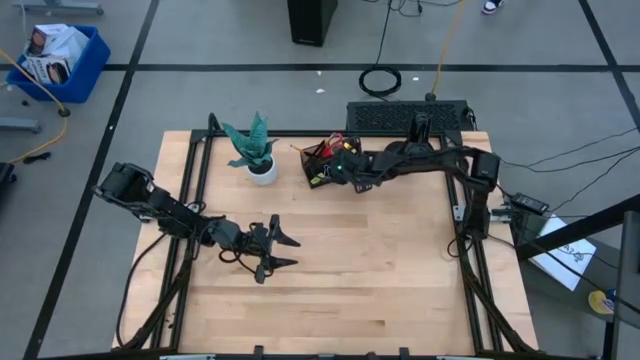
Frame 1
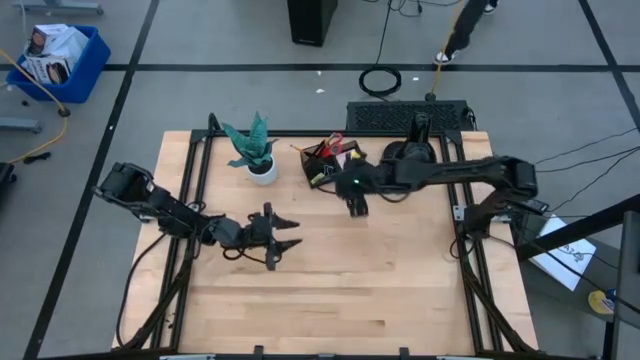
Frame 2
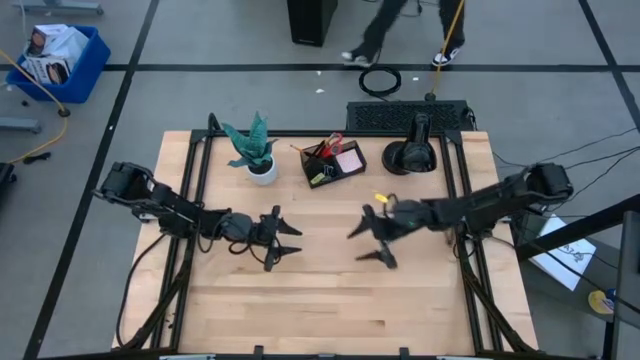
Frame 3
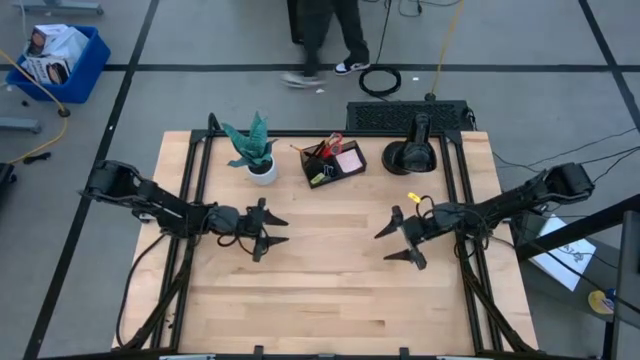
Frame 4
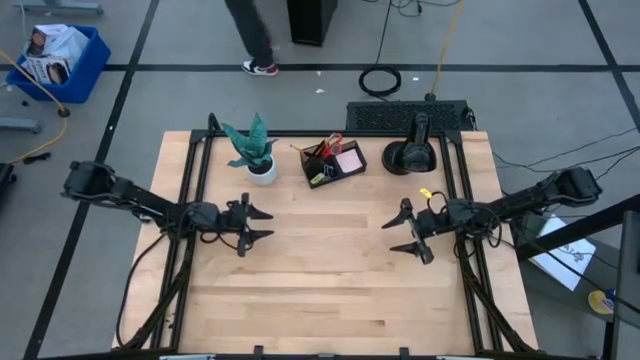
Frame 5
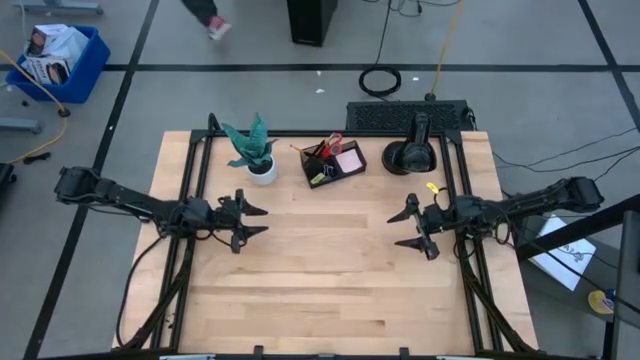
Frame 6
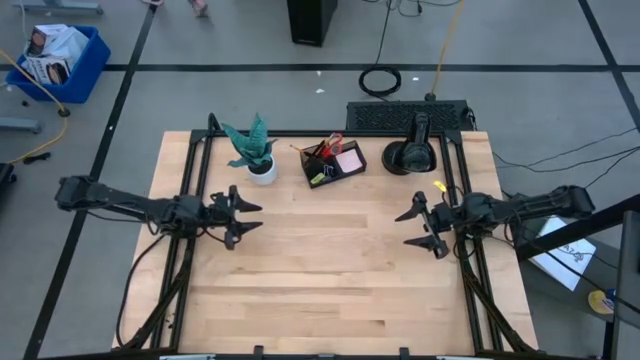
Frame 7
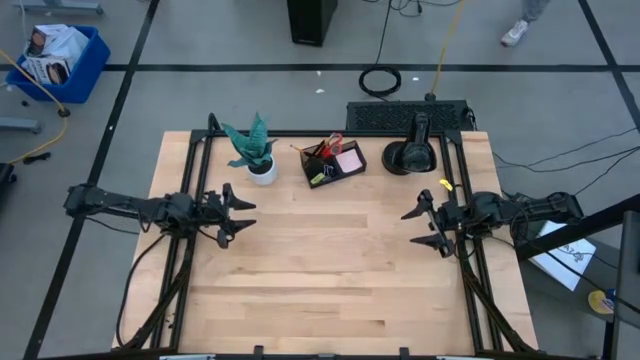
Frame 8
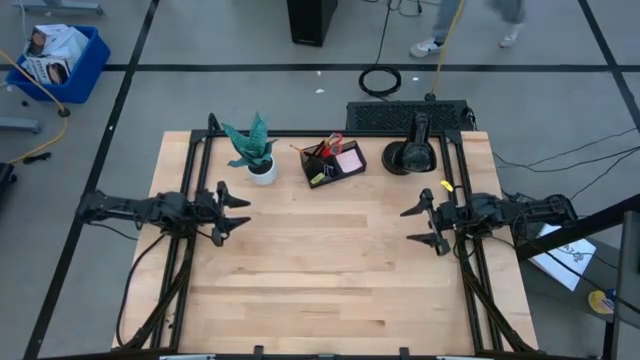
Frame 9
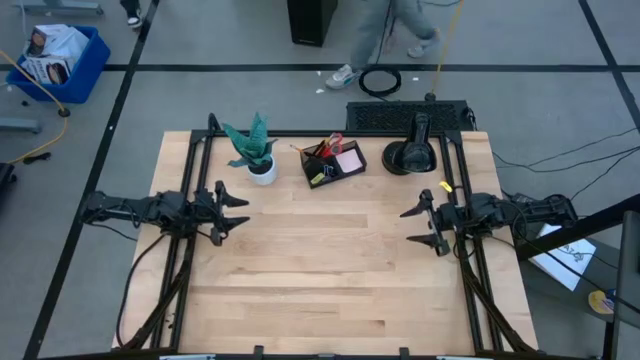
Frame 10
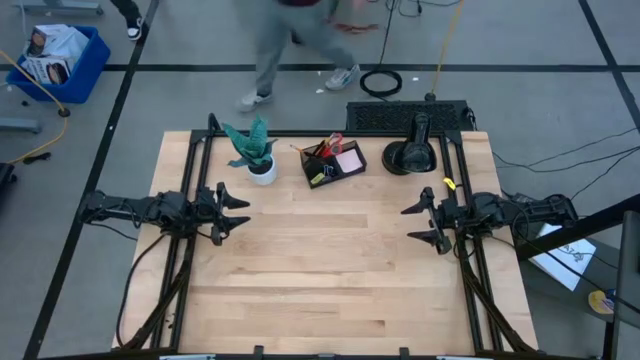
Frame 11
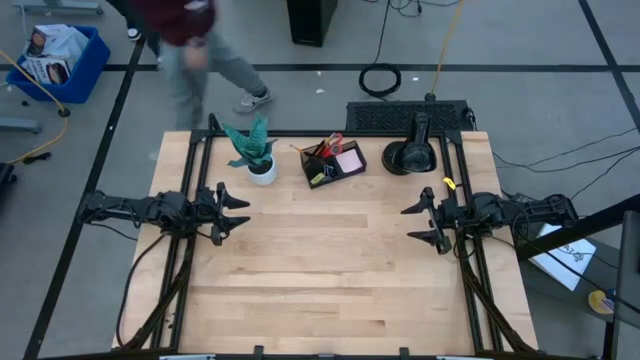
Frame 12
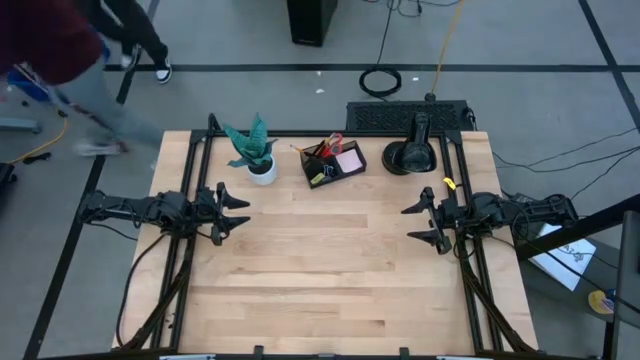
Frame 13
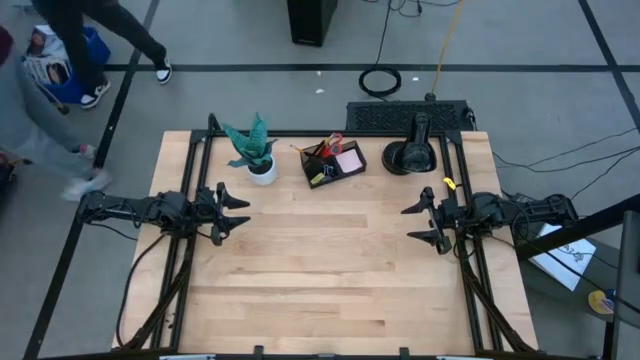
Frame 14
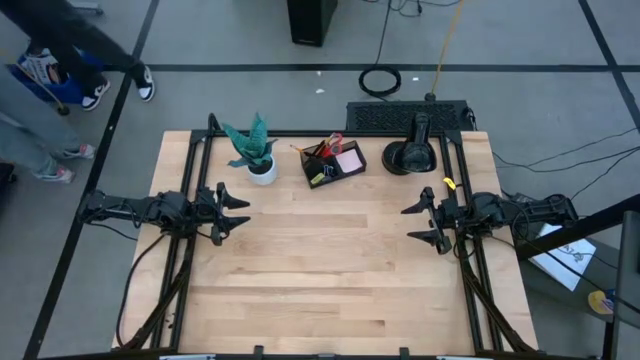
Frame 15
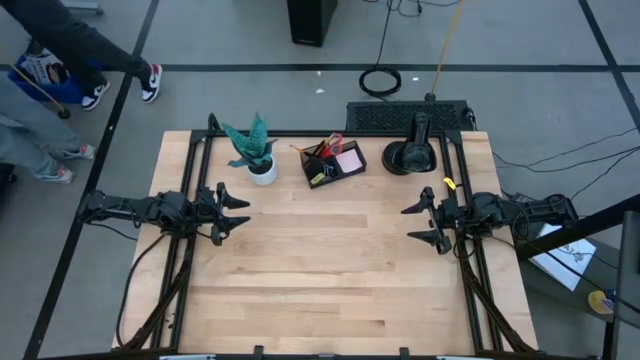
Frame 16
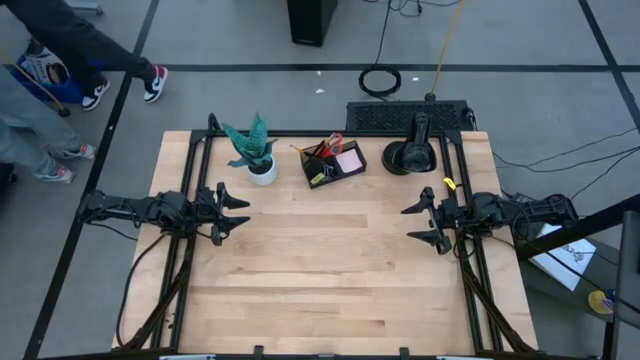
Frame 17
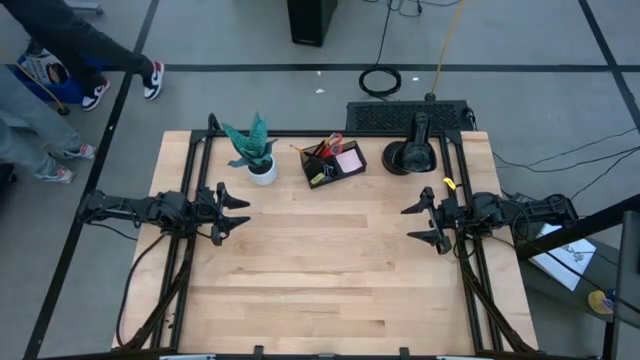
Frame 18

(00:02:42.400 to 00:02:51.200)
Task: Pick and place office supplies into organizer
Return to Home Position

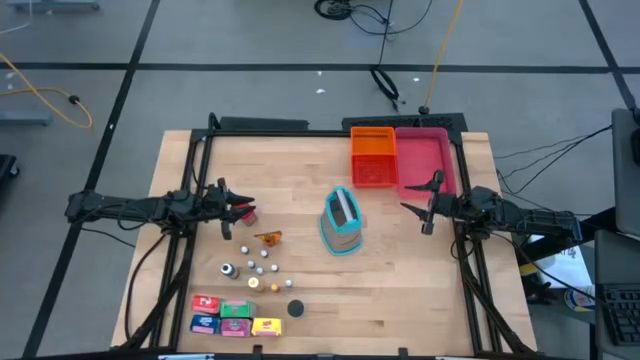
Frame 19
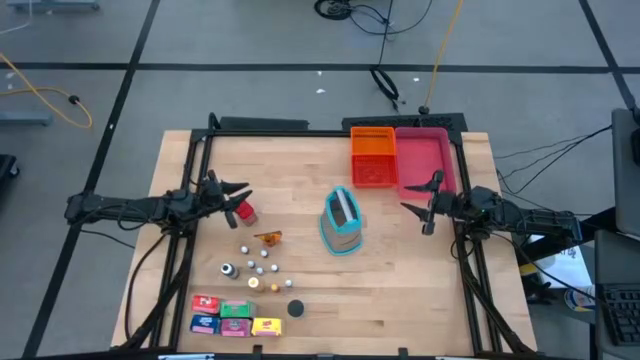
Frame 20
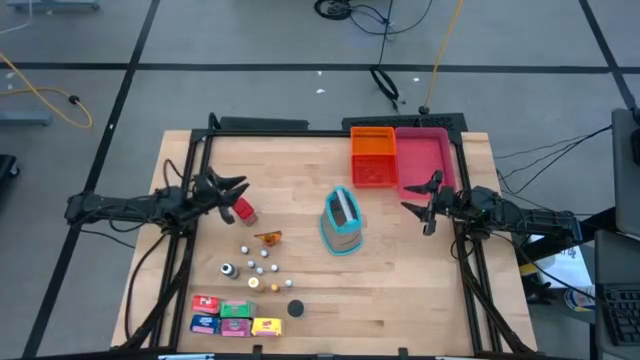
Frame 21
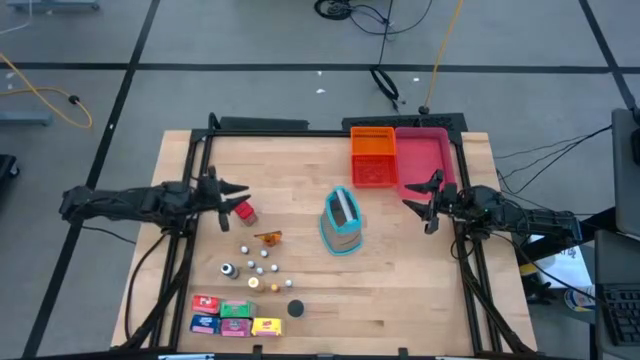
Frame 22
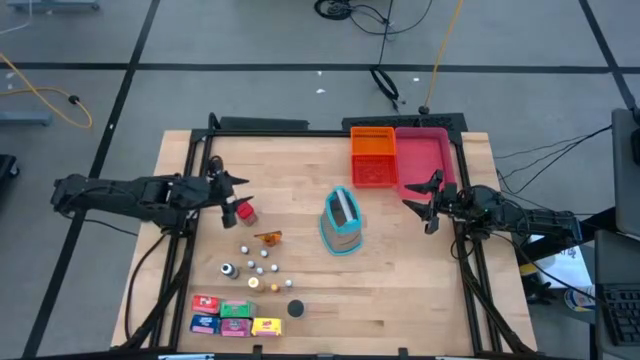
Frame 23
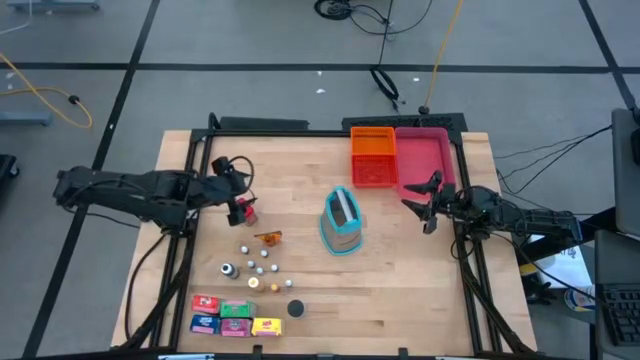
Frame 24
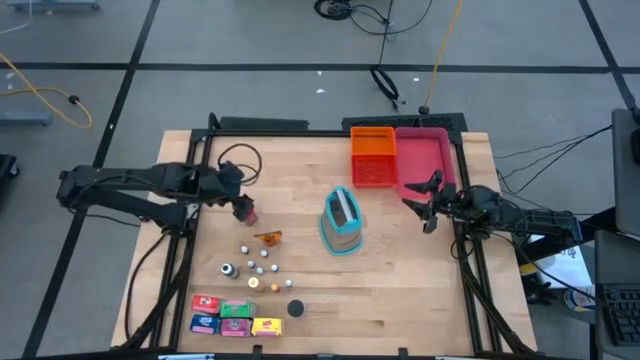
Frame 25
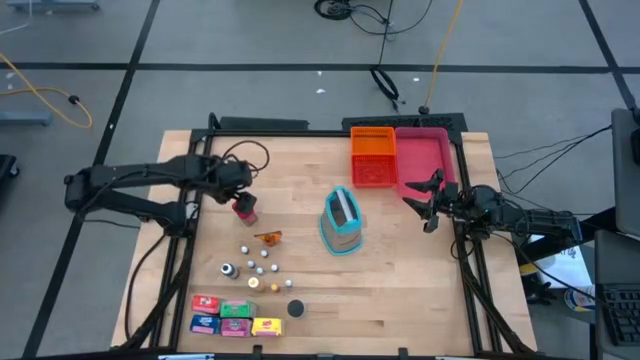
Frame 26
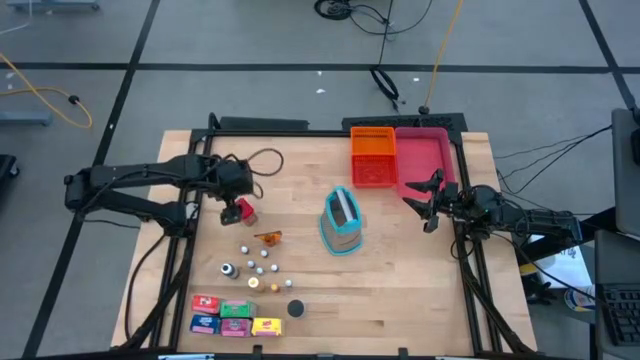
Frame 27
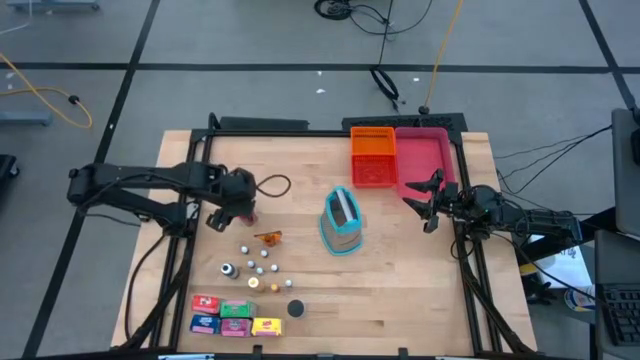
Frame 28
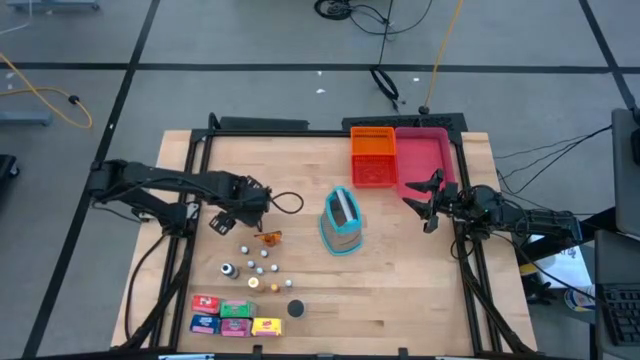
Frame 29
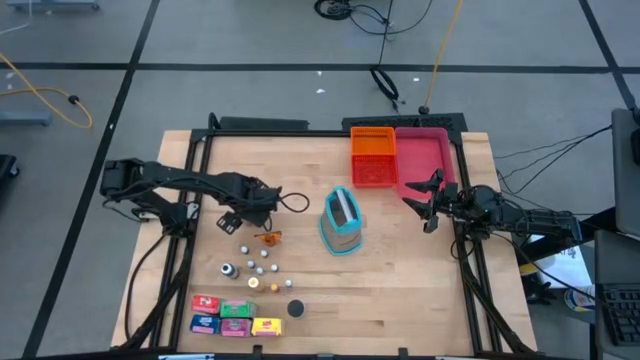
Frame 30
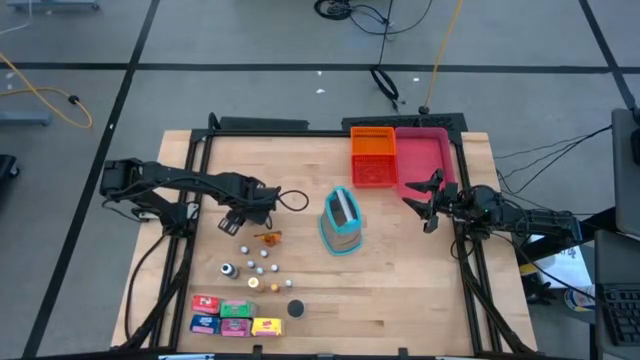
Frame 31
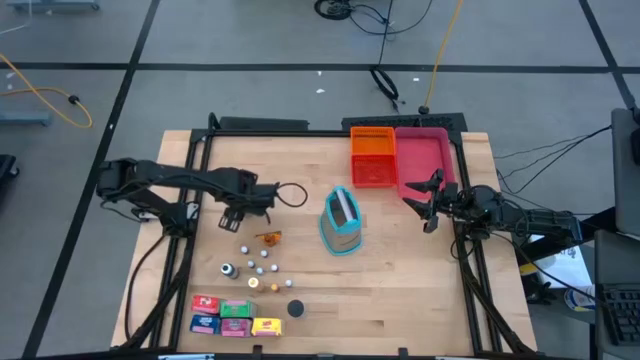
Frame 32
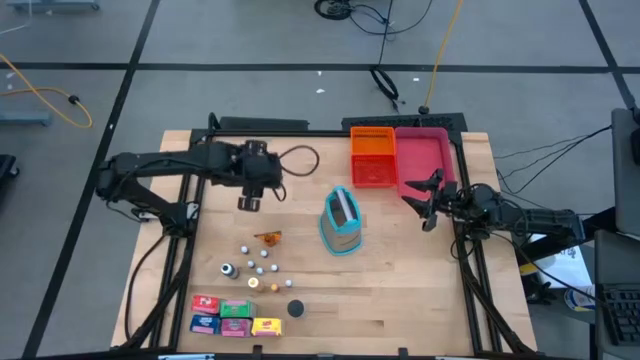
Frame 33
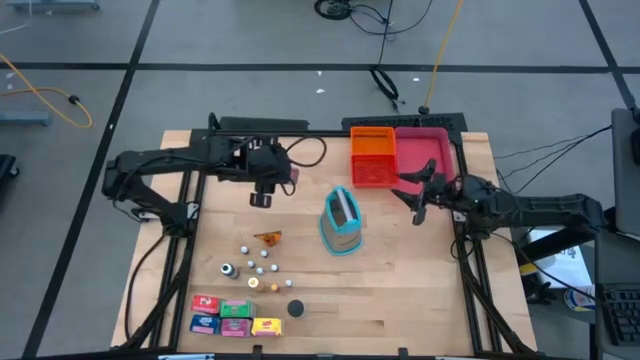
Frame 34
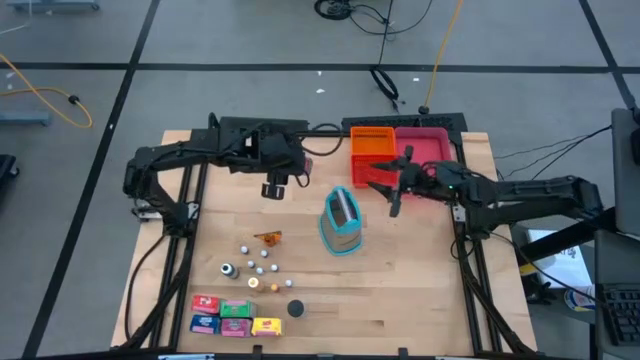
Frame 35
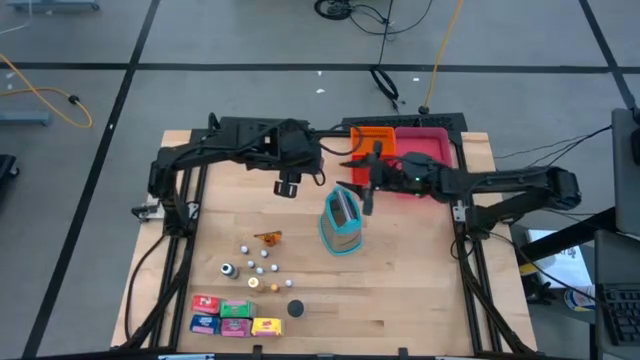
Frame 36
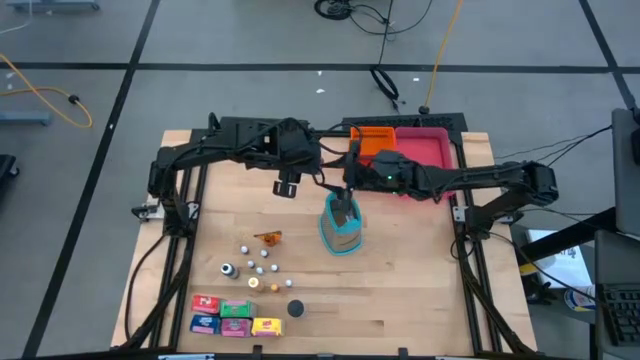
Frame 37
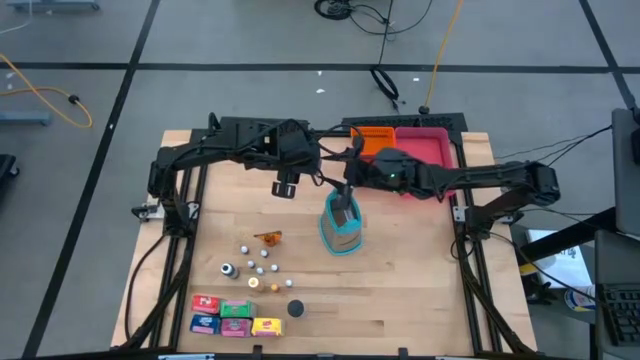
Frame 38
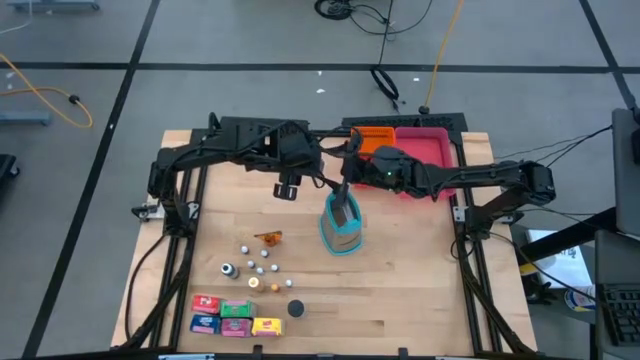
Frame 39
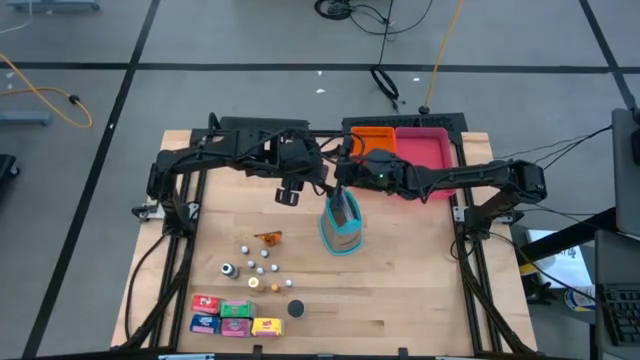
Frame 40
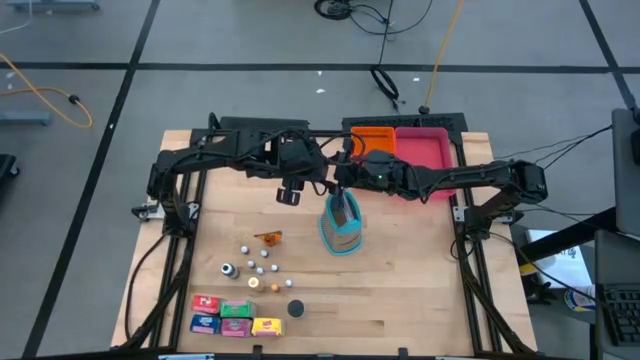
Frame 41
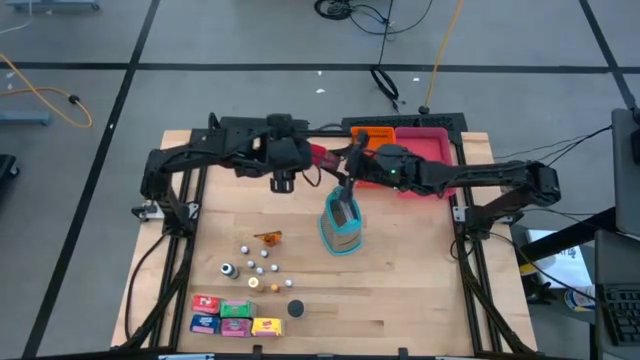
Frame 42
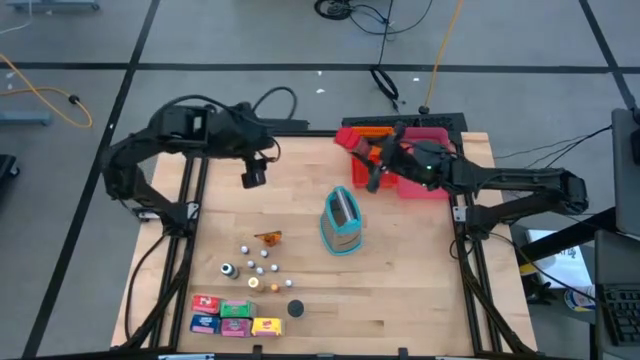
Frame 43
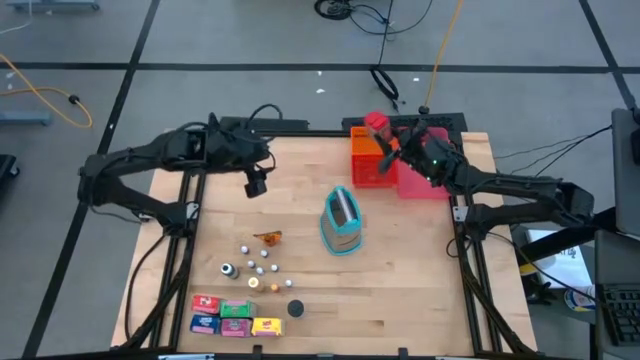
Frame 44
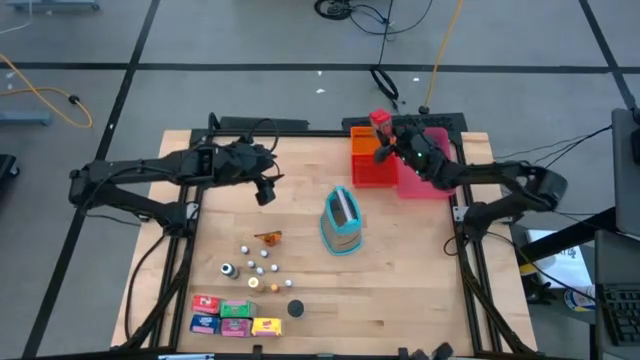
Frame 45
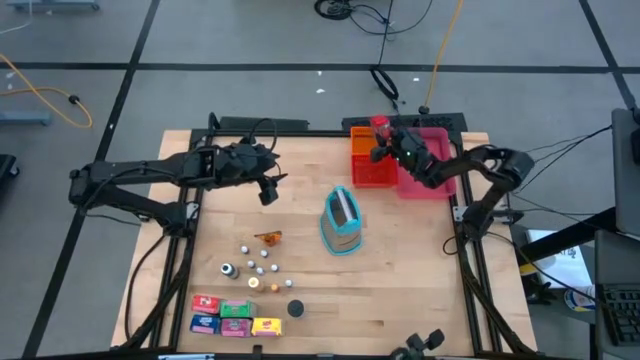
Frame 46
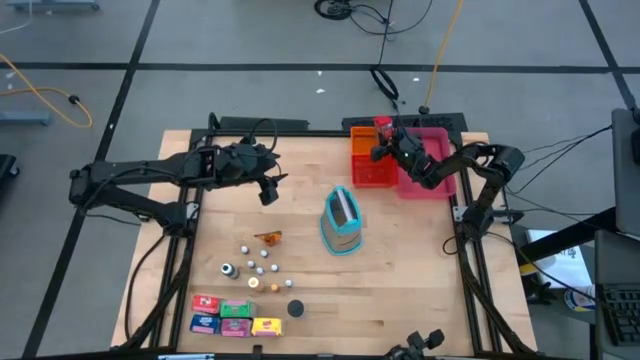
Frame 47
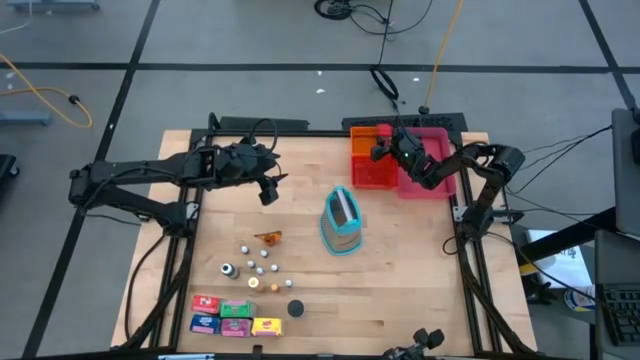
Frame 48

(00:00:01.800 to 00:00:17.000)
Task: Pick & Place Kitchen Items
Put the red seasoning can into the orange bin
